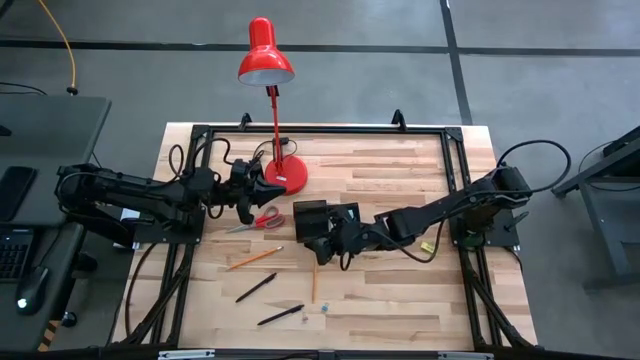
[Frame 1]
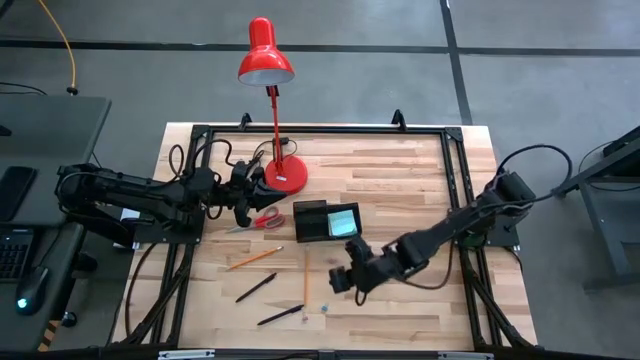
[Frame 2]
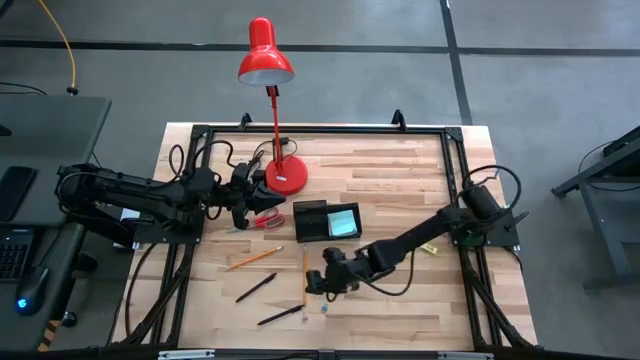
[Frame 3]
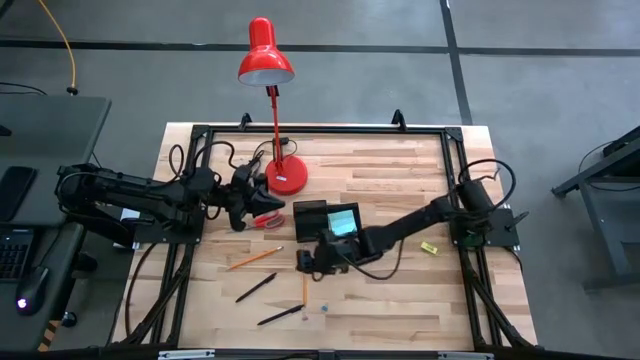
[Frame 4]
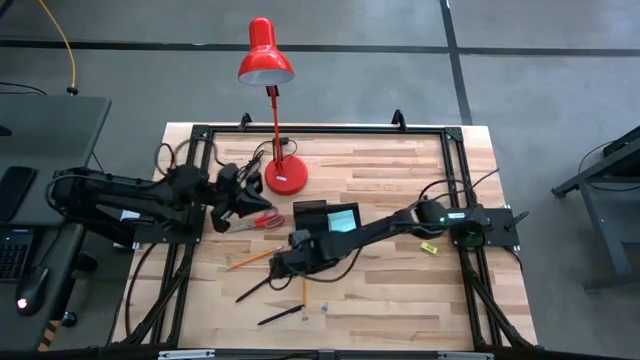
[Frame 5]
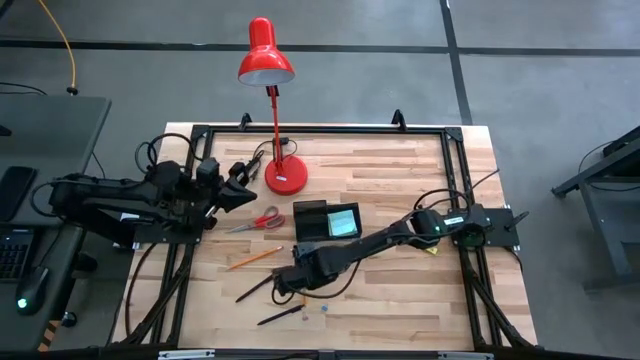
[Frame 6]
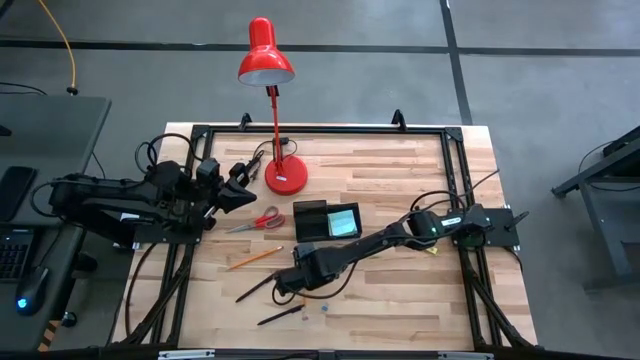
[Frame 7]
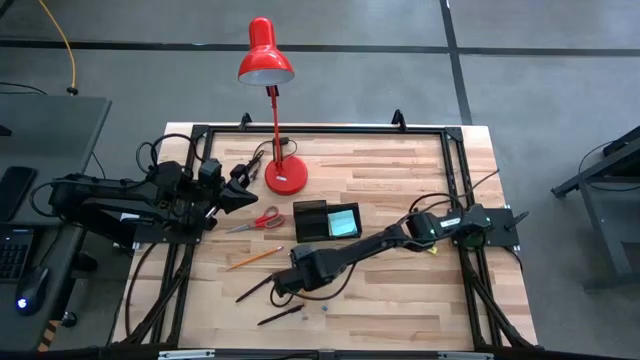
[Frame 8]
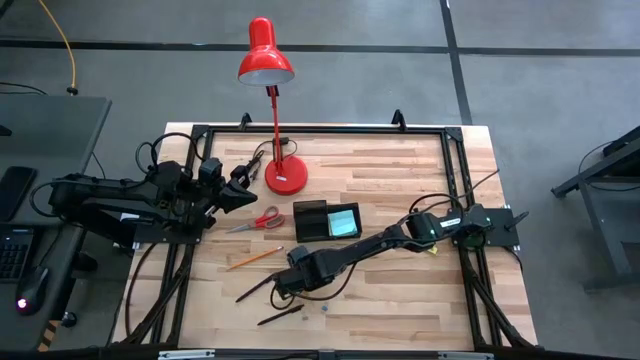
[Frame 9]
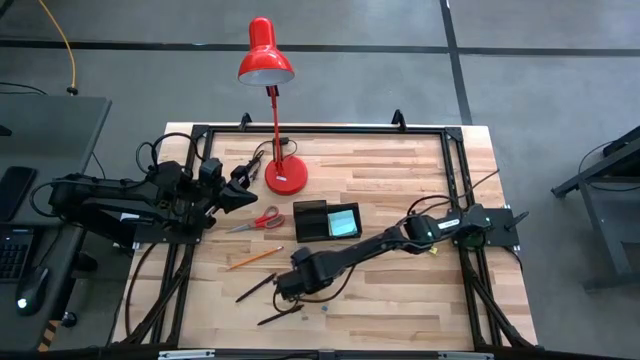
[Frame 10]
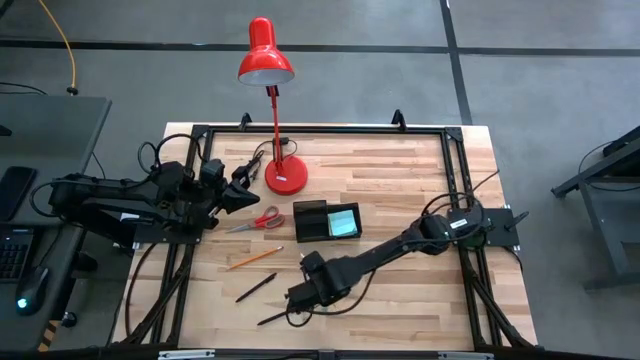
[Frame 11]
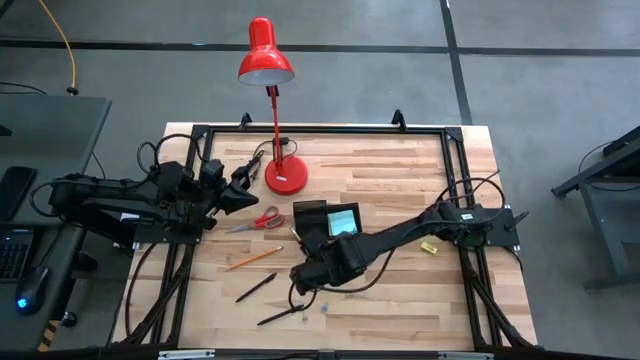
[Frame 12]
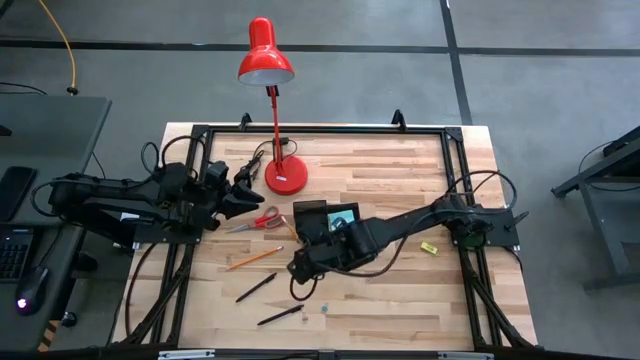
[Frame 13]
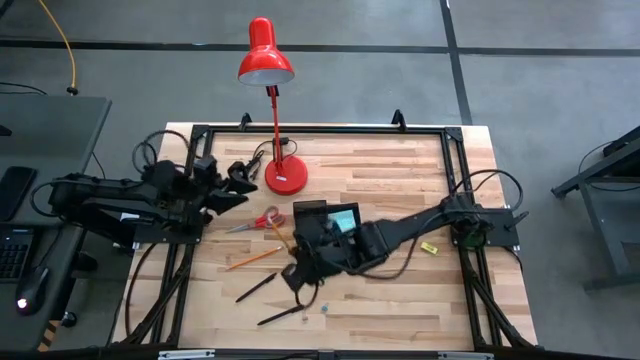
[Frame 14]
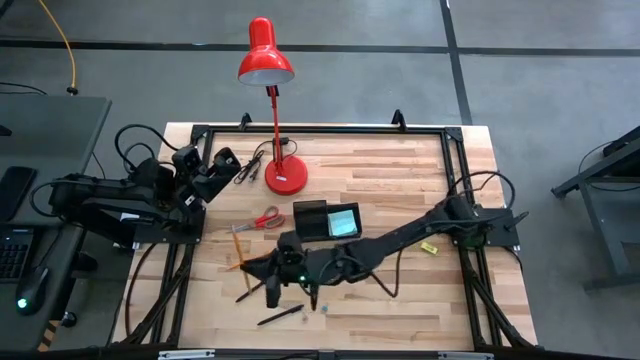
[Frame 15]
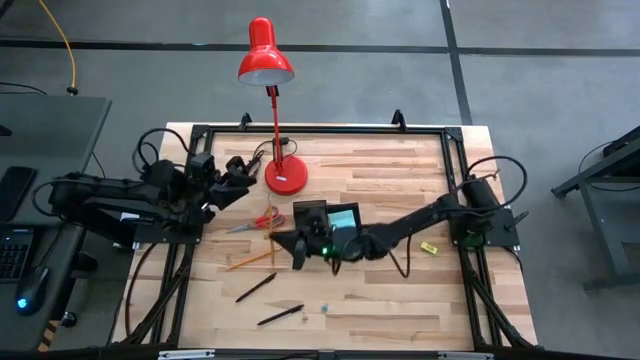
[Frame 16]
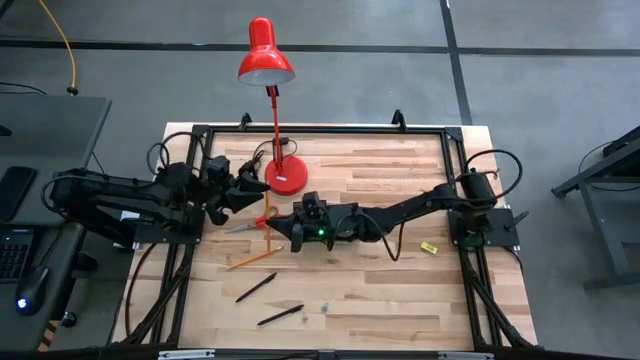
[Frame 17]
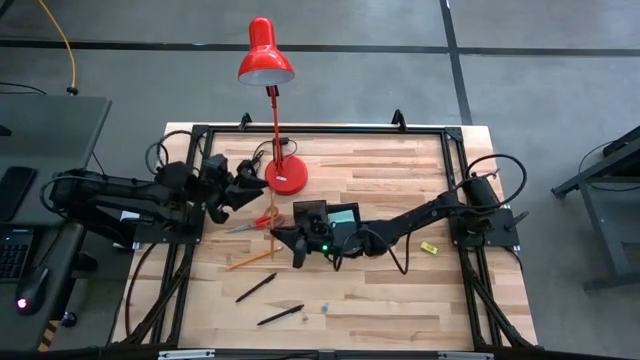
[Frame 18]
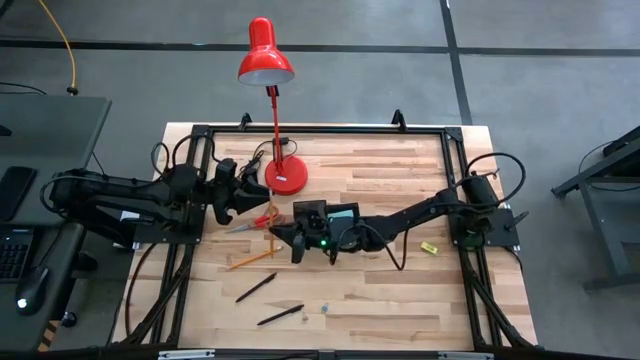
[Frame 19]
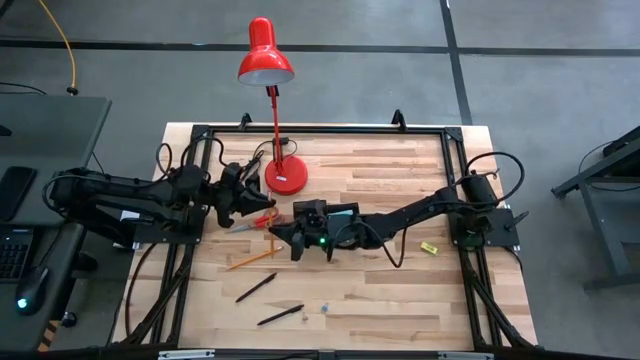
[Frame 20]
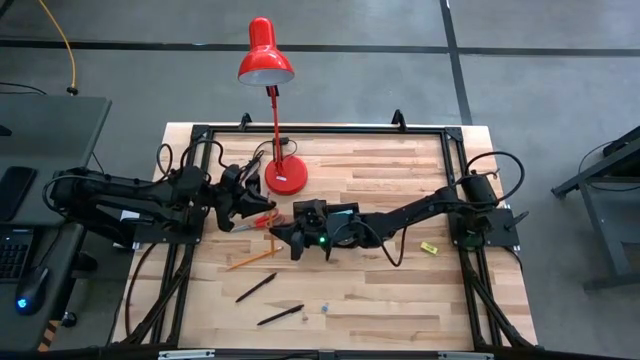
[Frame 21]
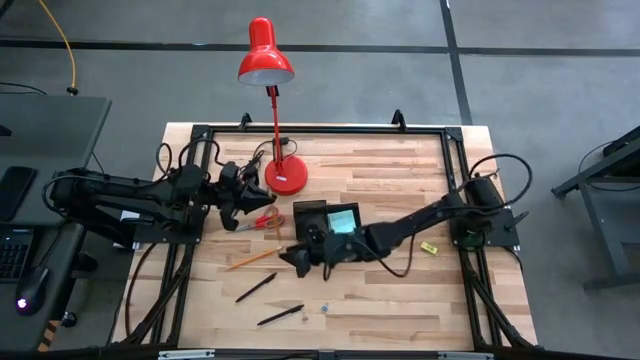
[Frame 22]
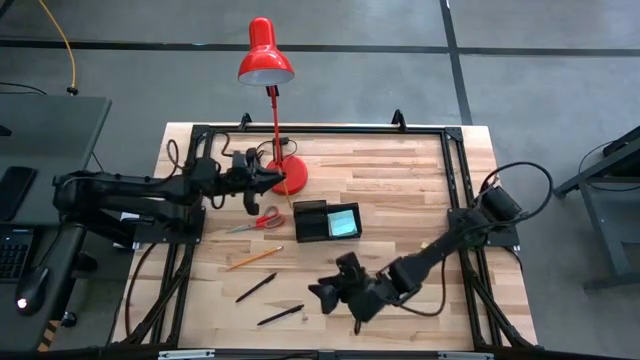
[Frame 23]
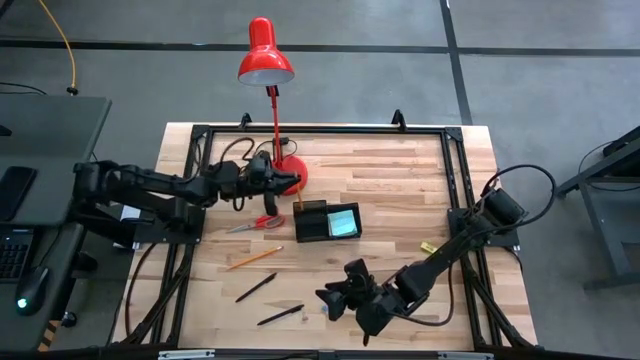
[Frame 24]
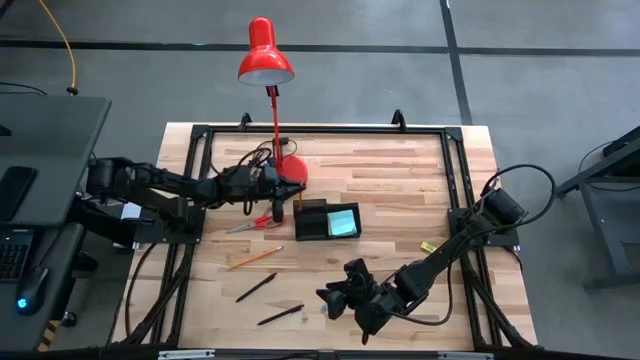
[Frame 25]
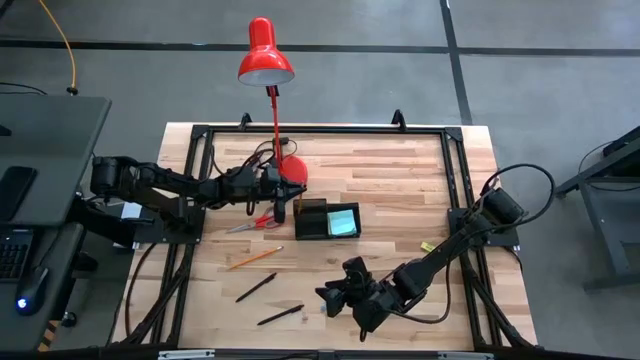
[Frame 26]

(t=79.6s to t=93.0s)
Task: Pick and place office supplies into organizer
Put the orange pencil into the black desk organizer

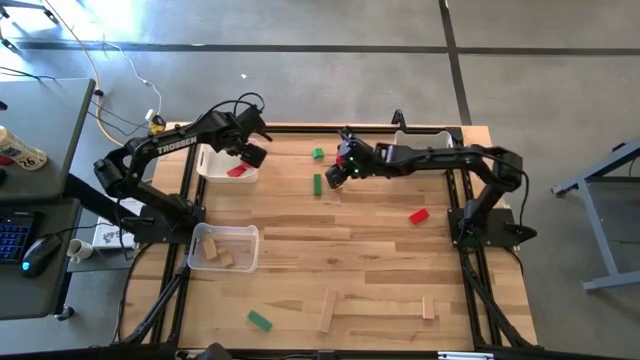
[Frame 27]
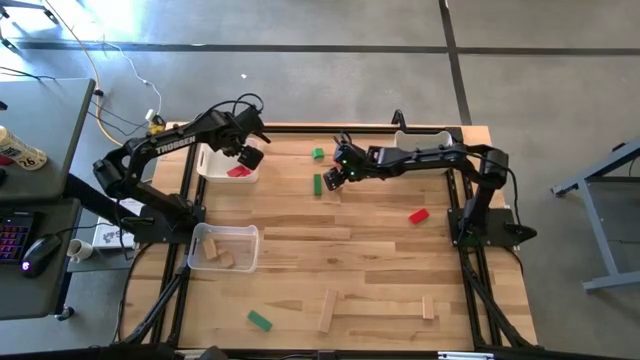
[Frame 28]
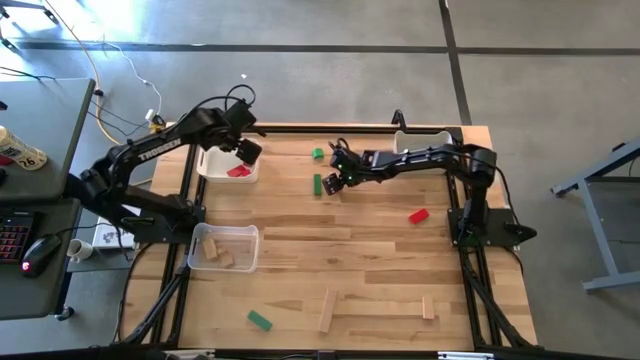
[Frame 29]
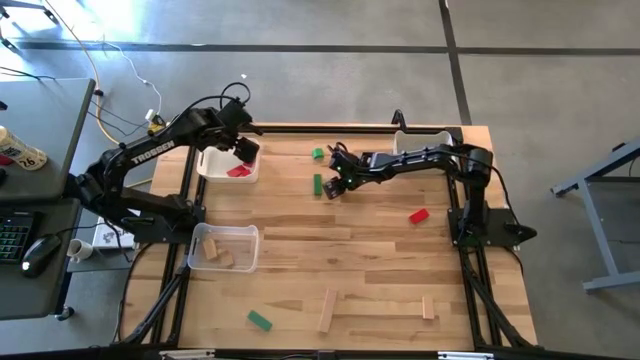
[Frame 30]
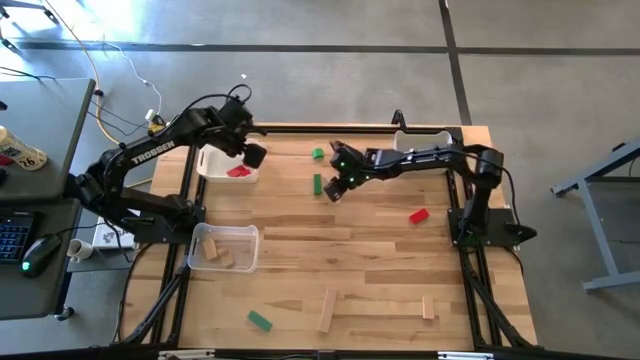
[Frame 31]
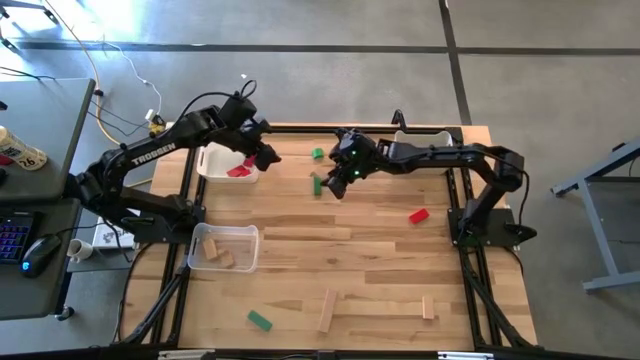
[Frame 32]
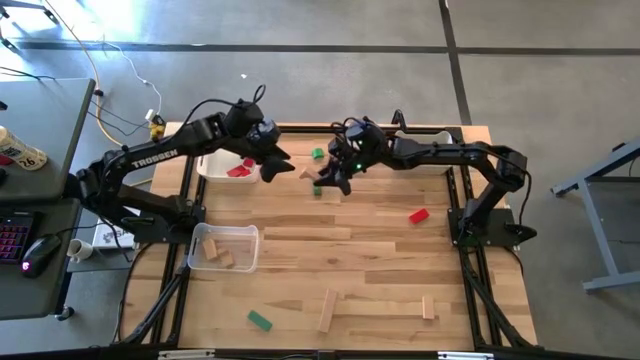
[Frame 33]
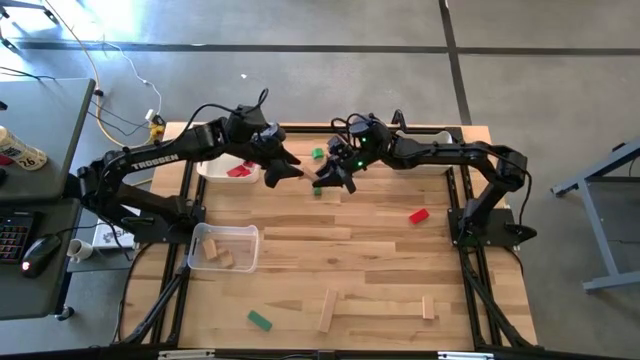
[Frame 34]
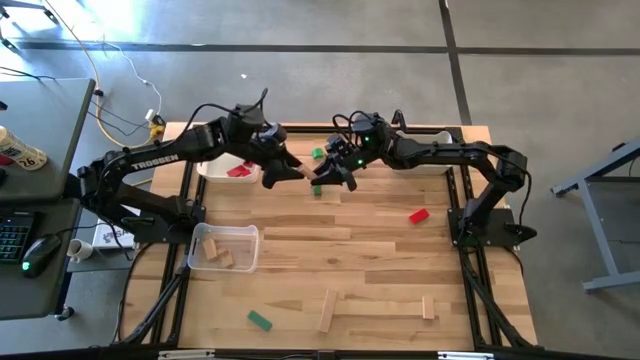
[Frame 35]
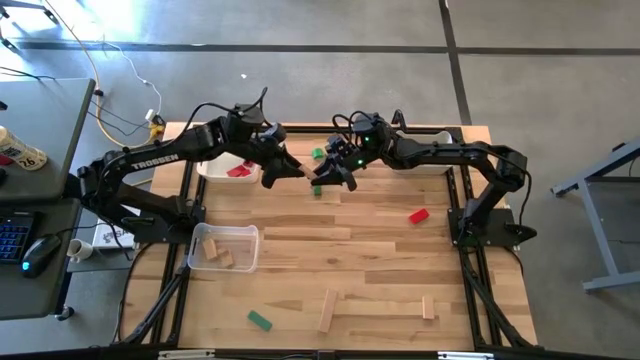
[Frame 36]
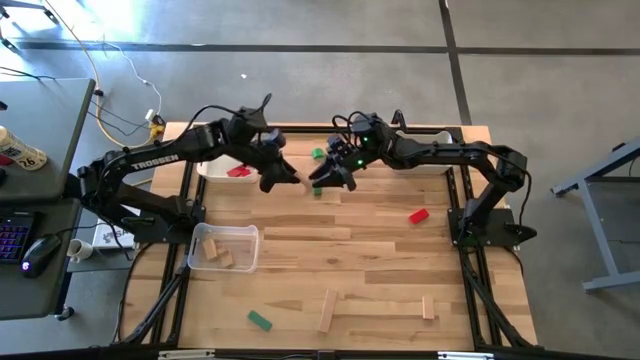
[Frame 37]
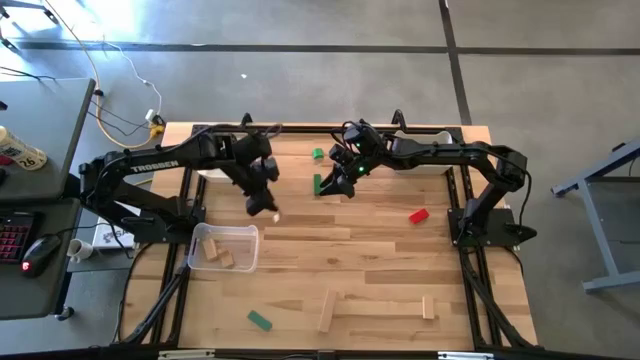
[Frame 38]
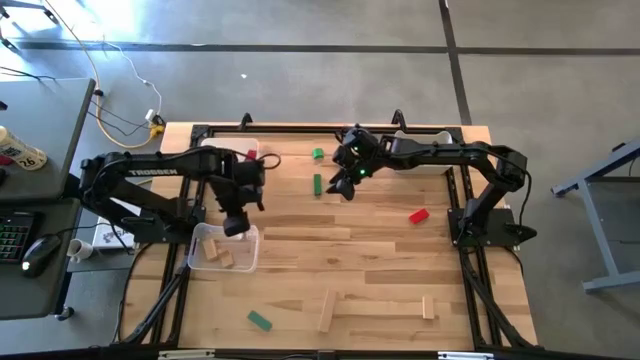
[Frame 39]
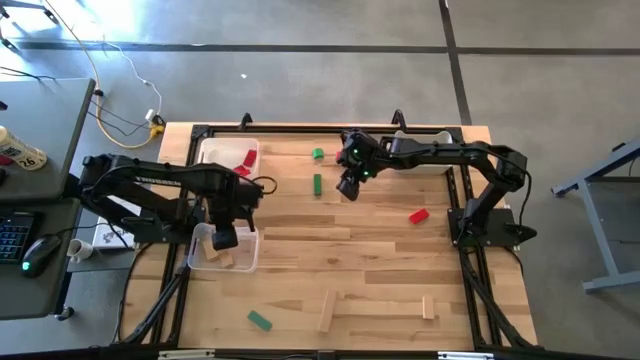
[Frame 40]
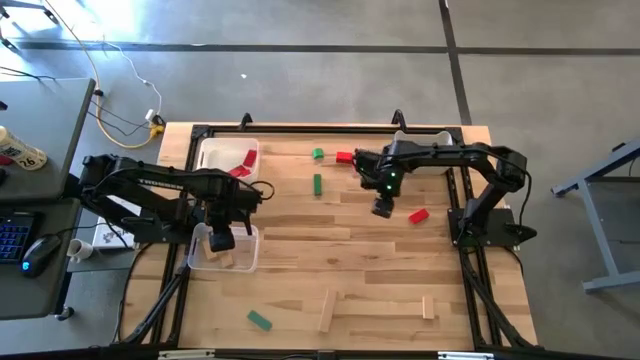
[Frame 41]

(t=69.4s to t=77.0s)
Task: Sort & place blocks by color
Put the cream rectangle into the transparent bin
